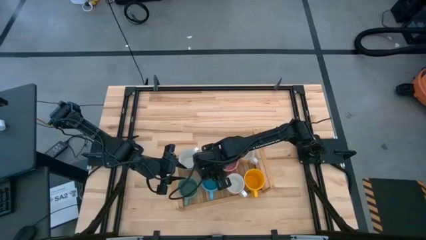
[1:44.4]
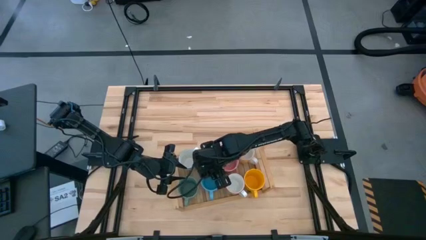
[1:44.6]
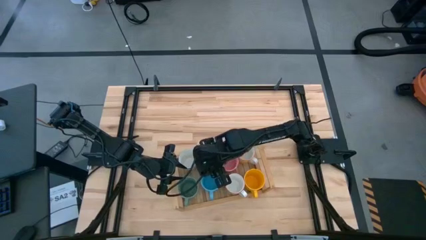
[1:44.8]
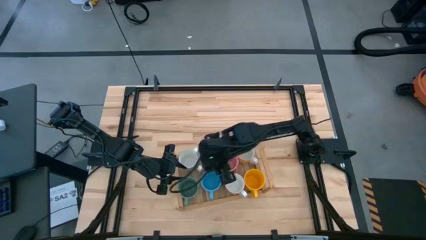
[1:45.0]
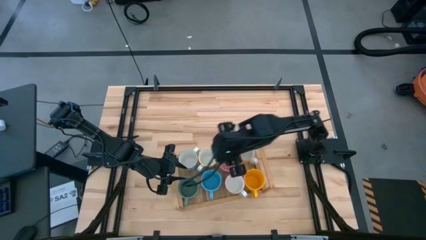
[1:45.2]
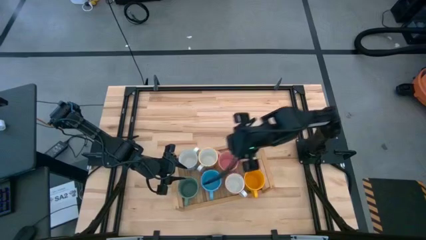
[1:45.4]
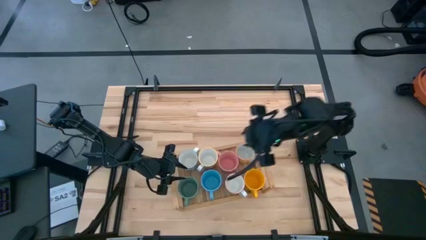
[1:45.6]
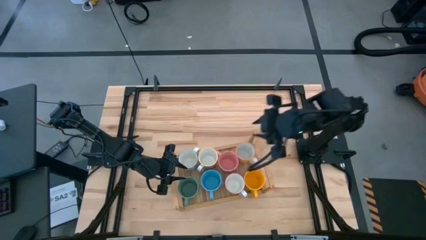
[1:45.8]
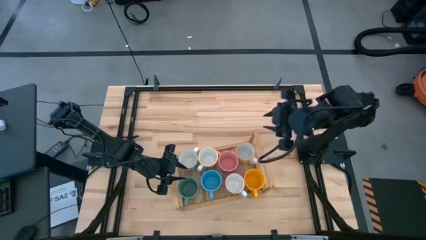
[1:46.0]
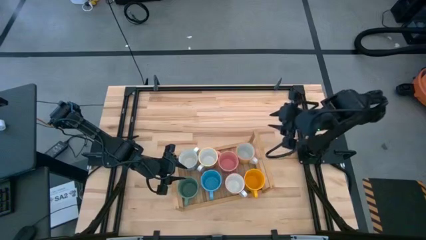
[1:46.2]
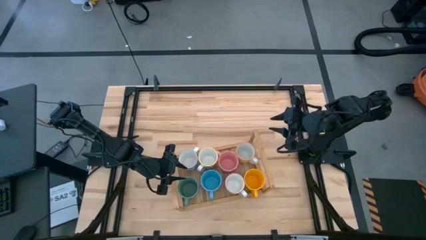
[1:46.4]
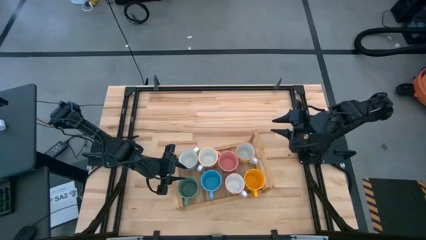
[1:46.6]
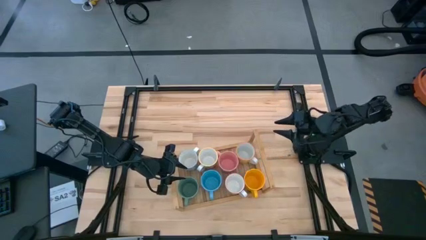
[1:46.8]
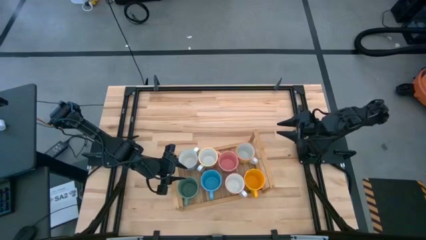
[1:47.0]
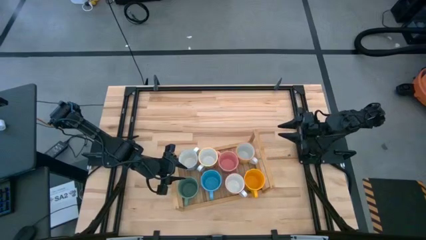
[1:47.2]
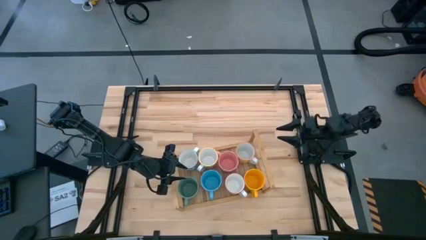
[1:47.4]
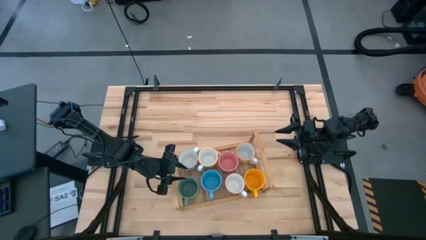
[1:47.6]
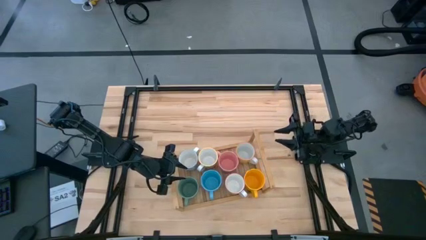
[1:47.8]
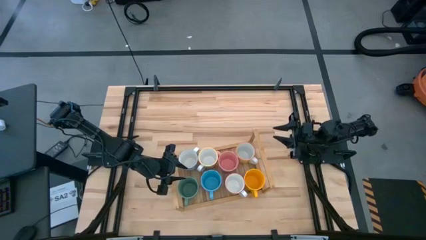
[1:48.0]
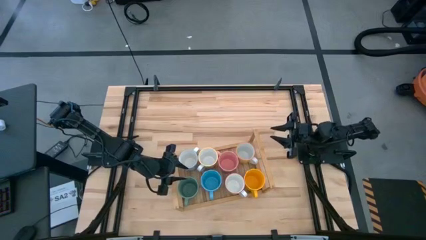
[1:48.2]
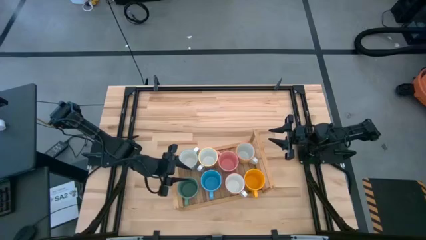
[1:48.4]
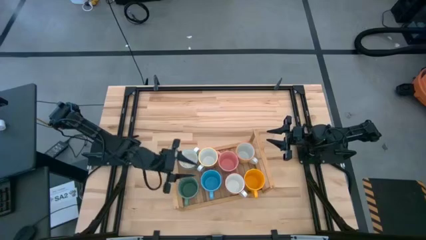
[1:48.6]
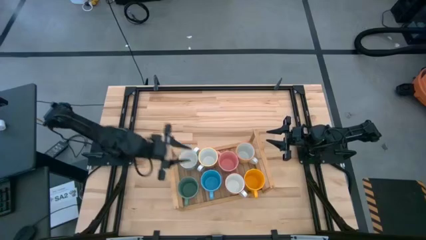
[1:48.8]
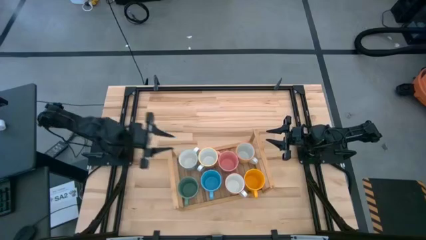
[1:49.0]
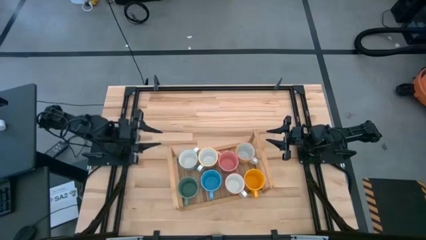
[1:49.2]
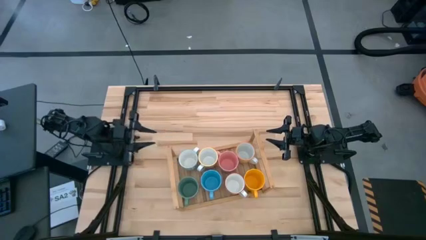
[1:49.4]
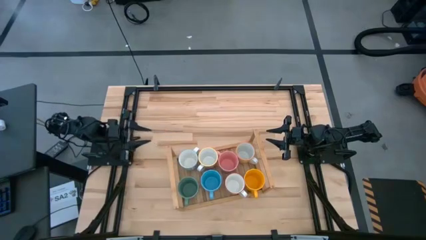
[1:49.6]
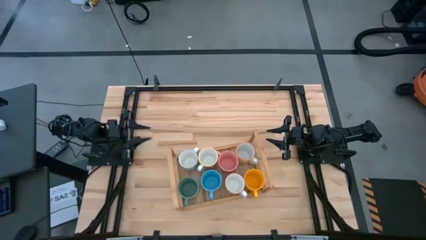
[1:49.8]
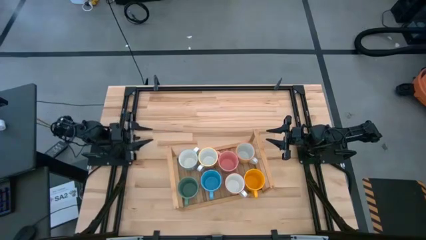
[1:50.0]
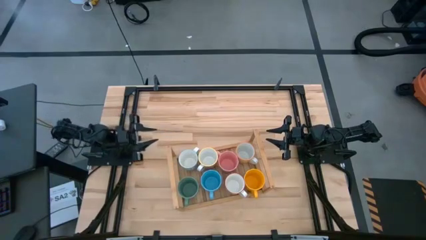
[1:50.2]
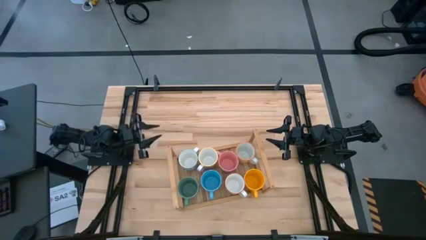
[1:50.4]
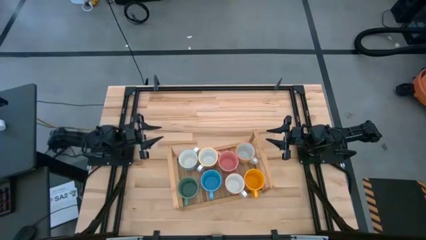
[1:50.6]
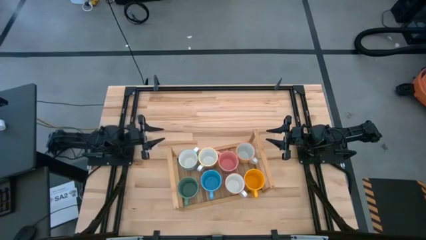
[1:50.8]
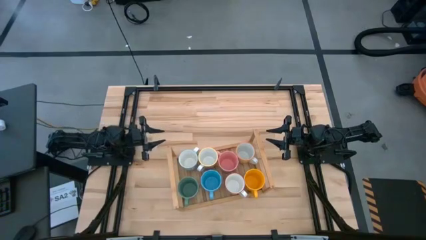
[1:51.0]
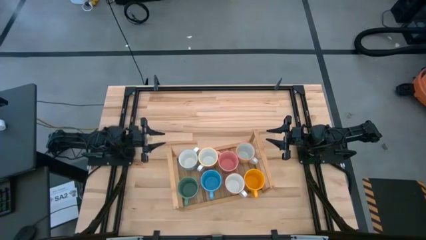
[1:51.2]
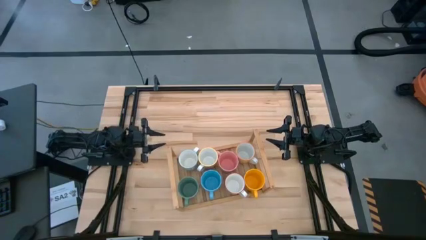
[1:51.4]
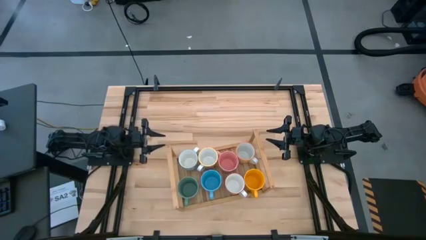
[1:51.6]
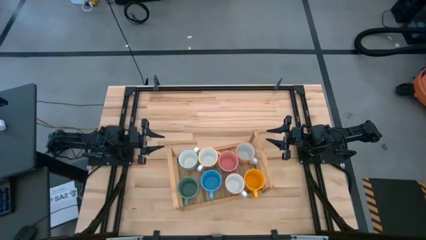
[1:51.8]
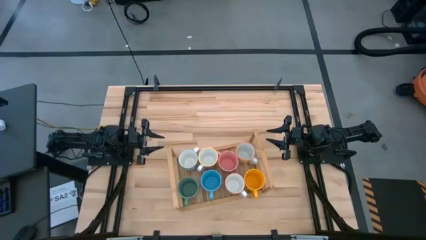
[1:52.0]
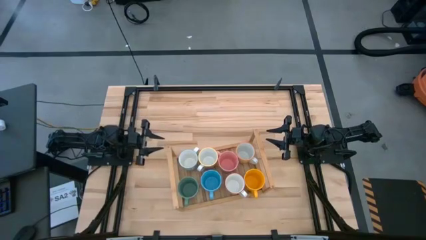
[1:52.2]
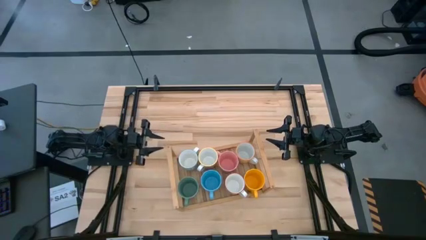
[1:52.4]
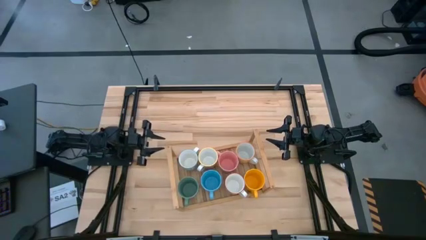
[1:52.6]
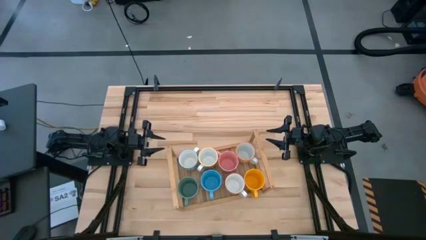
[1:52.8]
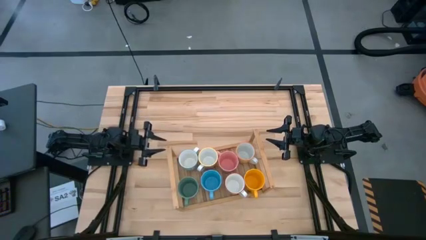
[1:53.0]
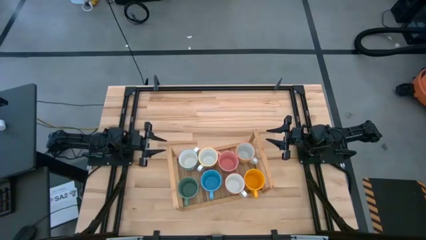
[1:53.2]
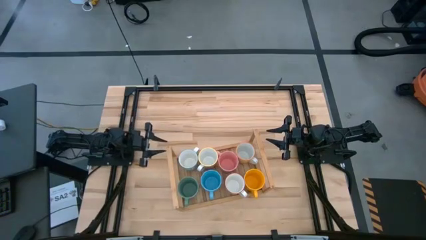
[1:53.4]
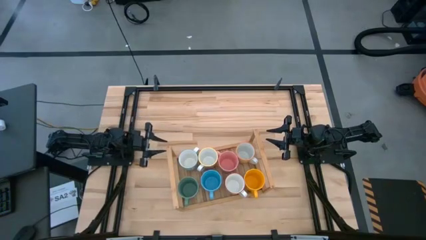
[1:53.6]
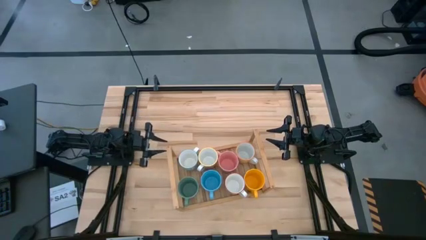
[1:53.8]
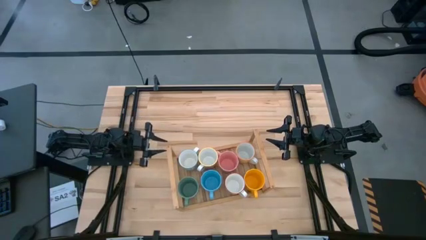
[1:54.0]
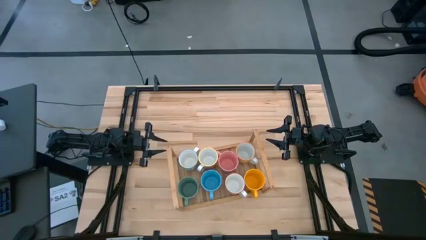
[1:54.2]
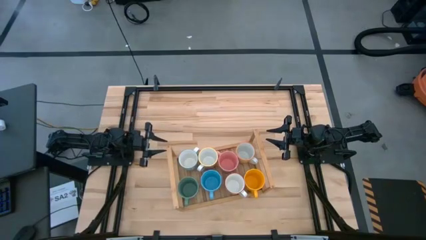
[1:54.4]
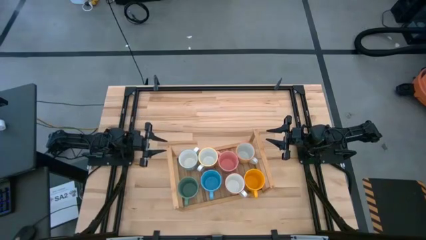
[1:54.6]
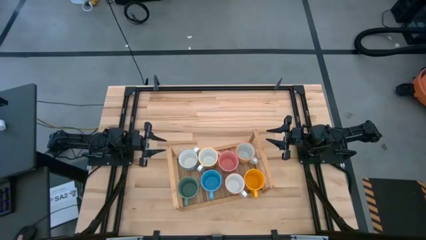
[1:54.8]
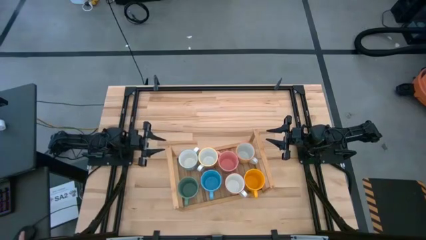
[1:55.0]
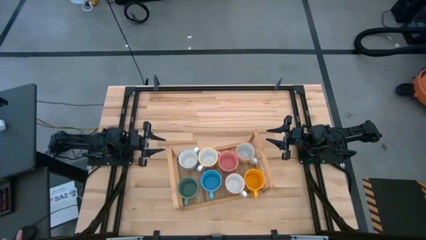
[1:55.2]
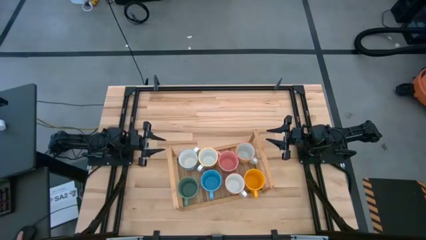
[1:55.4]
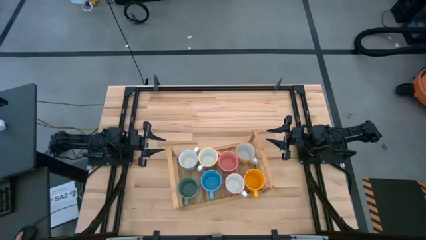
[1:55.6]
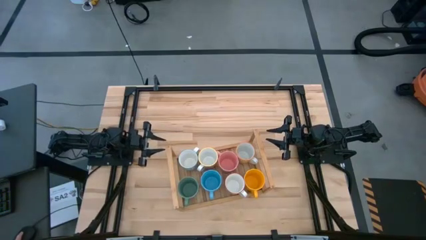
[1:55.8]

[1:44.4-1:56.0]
Task: Place coffee mugs
Return to Home Position

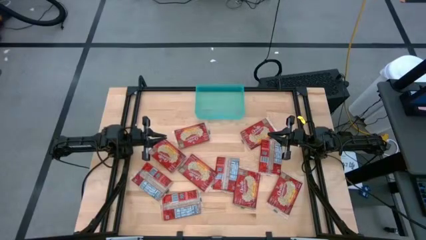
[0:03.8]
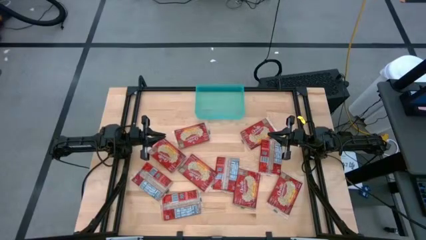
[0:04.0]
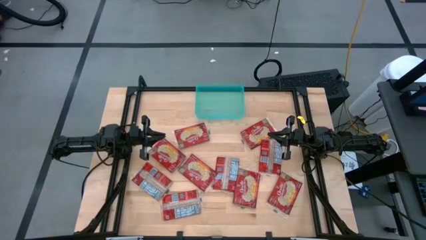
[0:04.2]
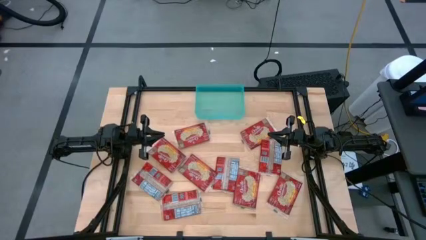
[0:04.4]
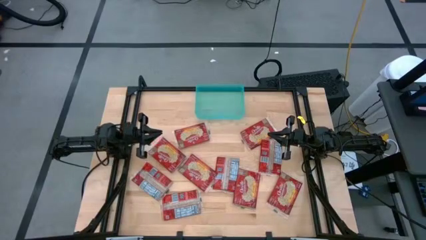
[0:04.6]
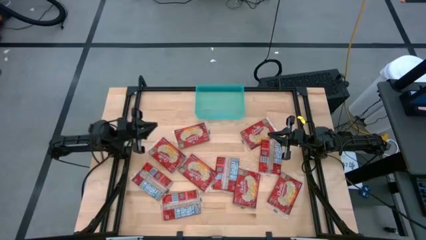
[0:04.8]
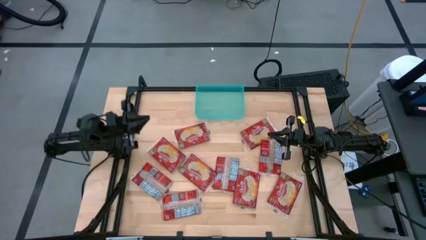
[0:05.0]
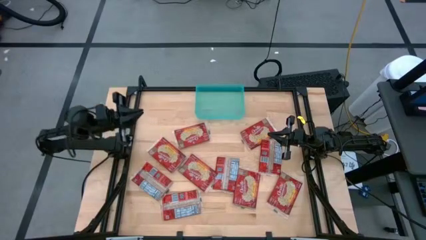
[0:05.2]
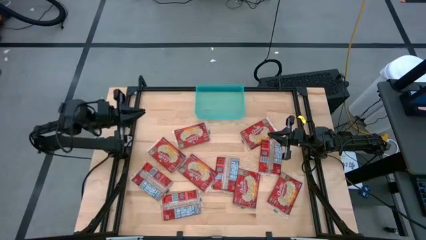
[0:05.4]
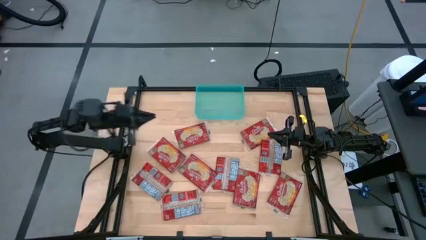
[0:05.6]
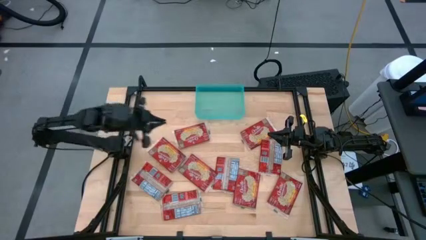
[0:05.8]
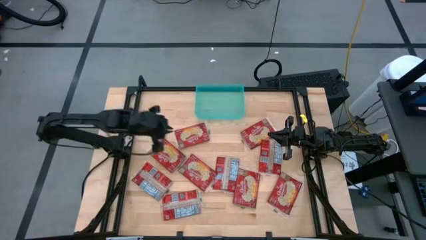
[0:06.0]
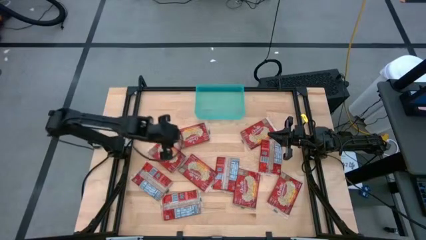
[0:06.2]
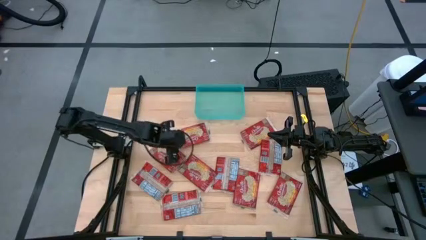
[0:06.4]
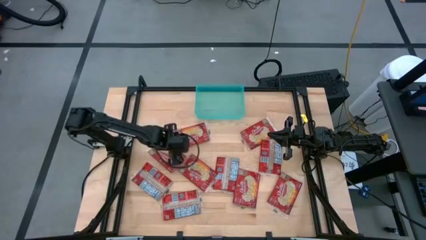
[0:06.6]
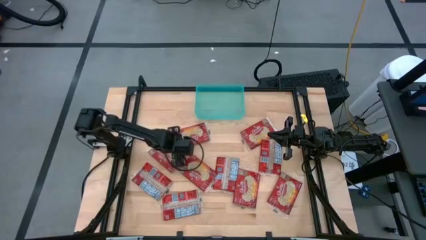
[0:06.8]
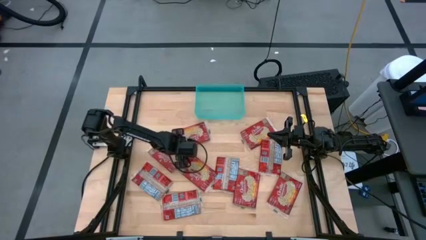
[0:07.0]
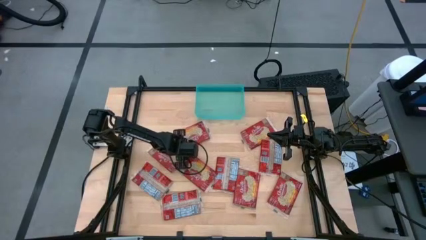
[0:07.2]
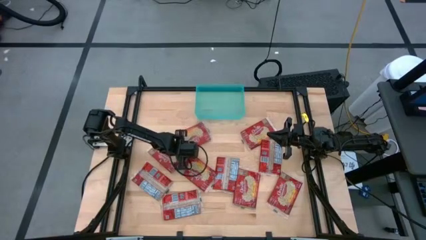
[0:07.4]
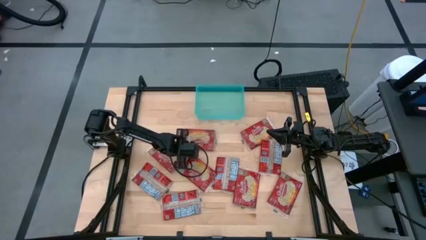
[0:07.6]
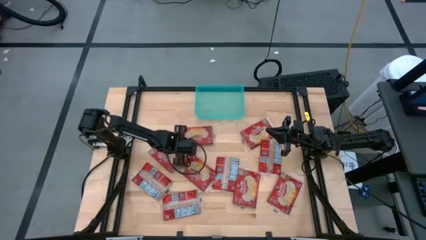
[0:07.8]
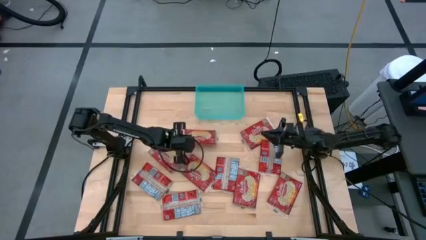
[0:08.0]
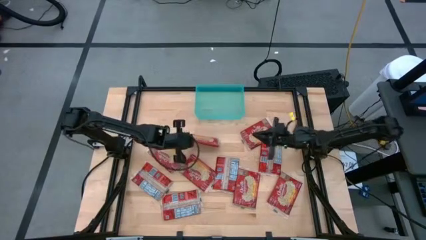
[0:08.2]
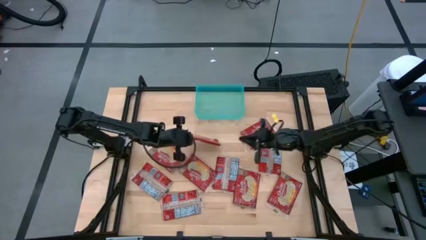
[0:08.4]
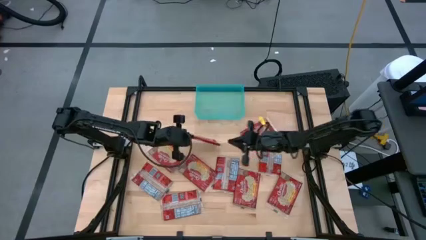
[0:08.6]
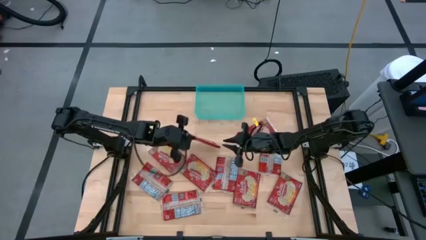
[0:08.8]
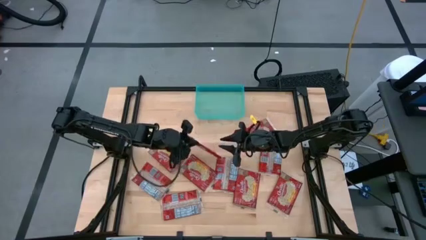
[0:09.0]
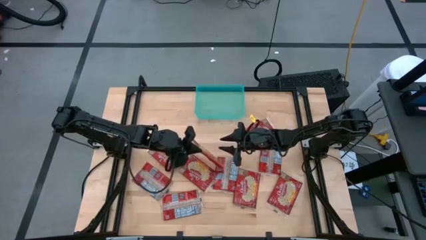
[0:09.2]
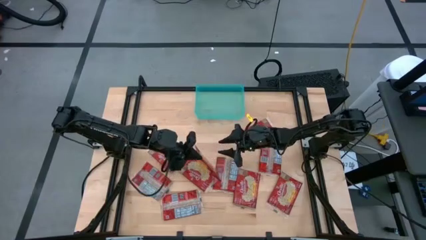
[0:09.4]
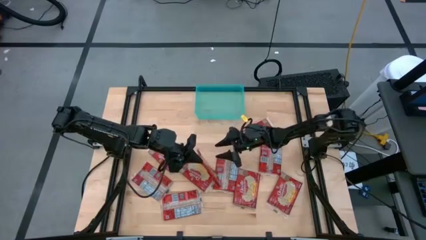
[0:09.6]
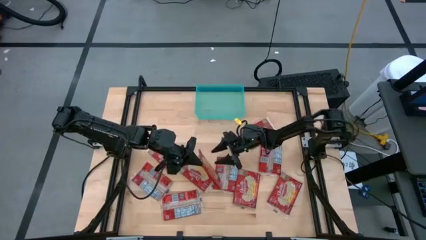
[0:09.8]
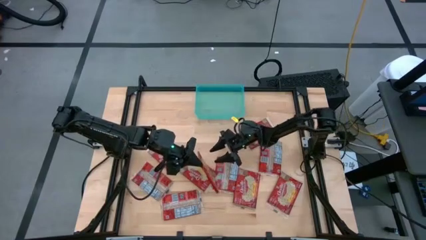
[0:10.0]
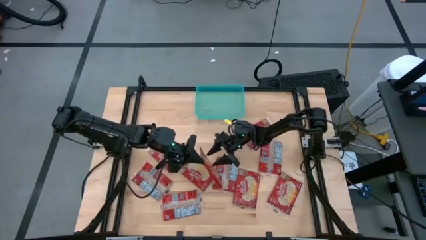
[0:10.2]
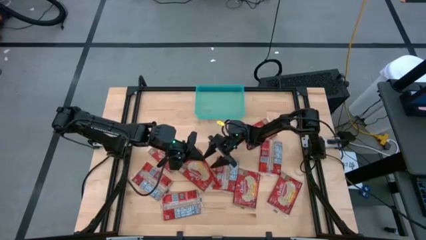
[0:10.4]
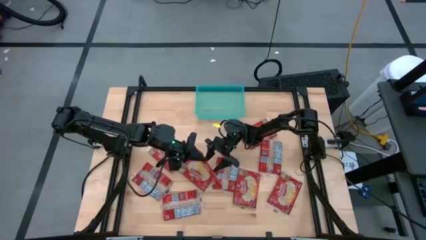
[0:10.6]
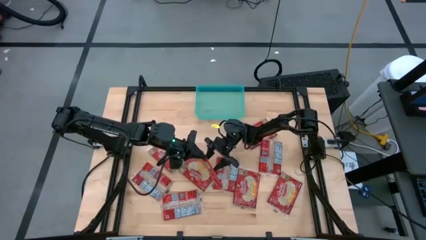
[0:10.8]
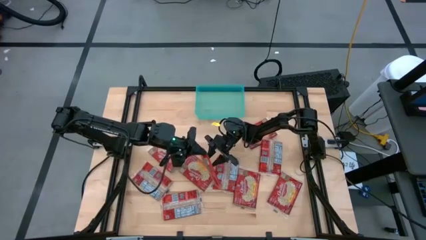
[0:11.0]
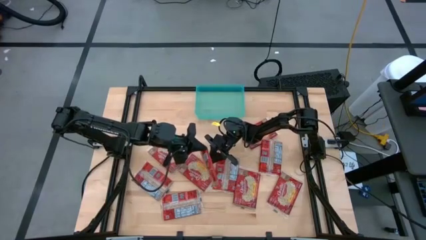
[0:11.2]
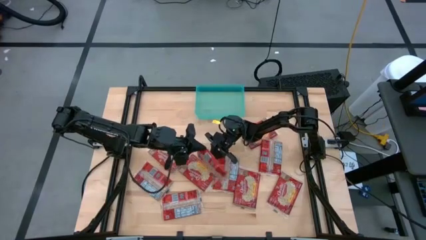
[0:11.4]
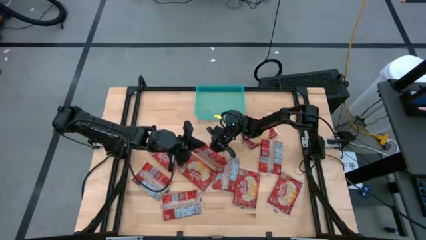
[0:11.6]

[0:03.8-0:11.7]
Task: Sort popcorn bags into baskets
Put the red popcorn bag into the blue bin
